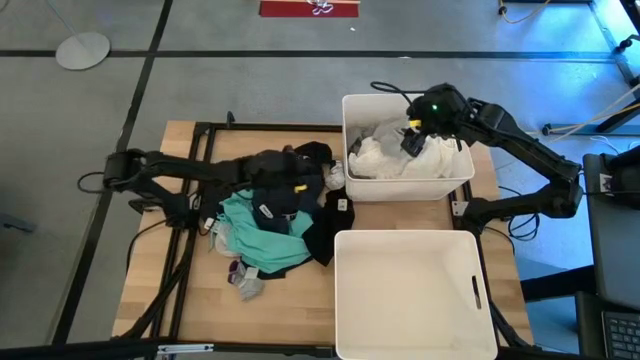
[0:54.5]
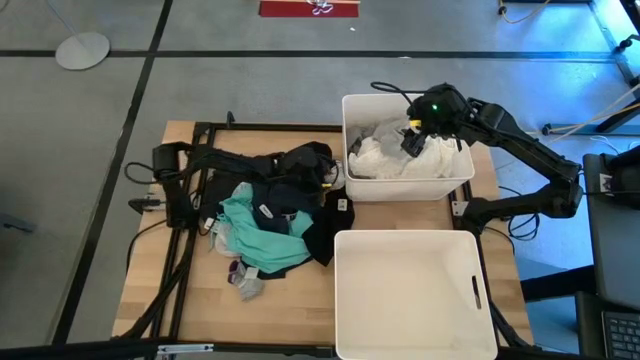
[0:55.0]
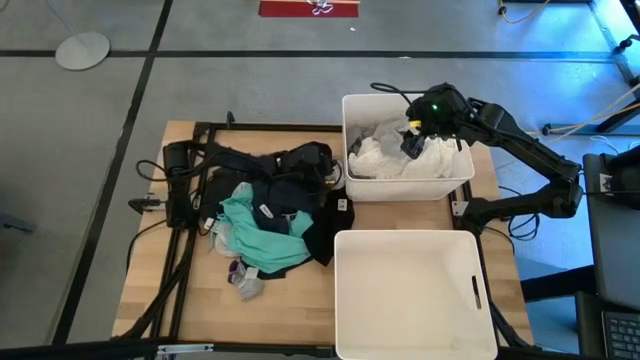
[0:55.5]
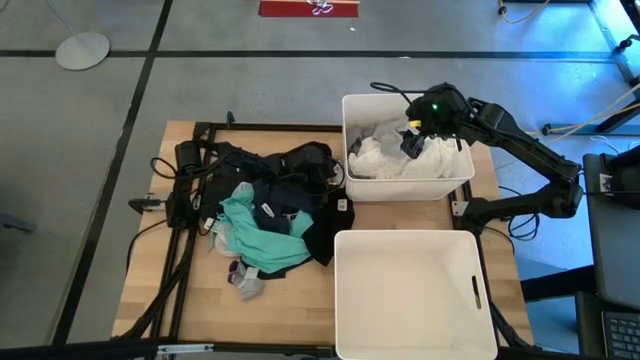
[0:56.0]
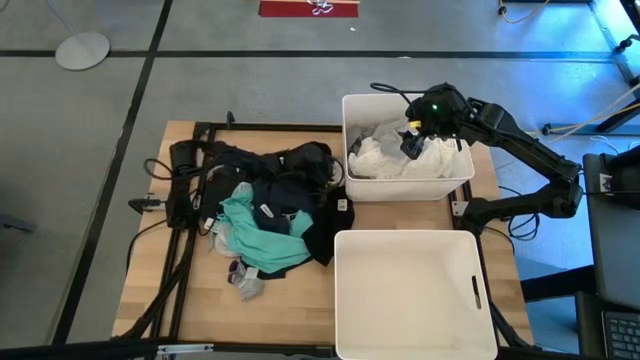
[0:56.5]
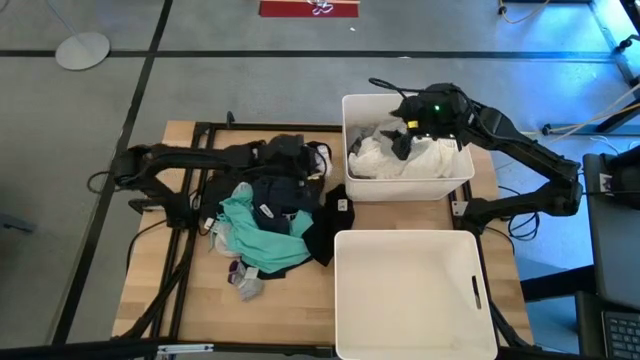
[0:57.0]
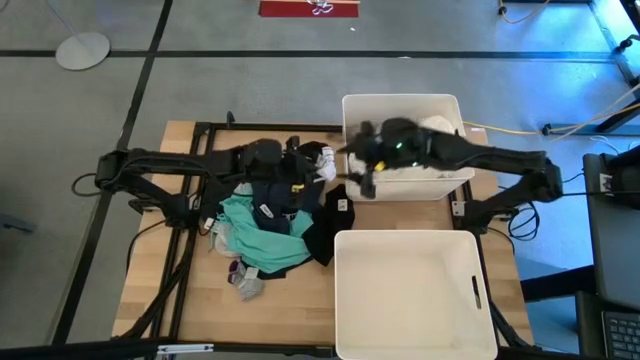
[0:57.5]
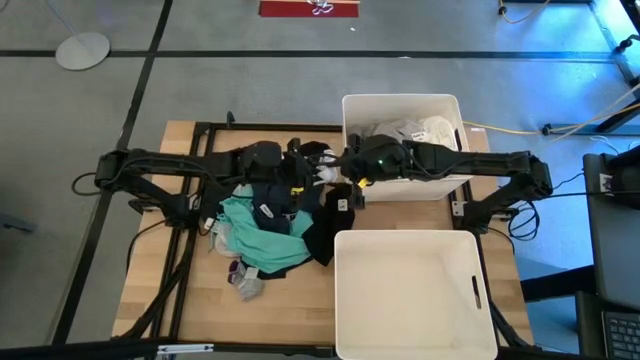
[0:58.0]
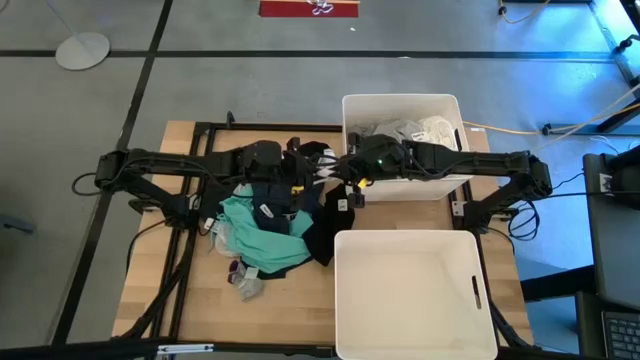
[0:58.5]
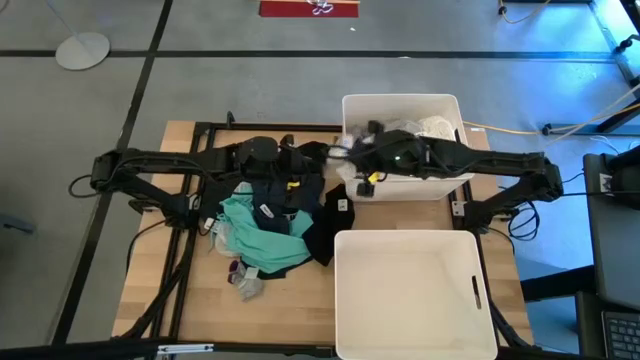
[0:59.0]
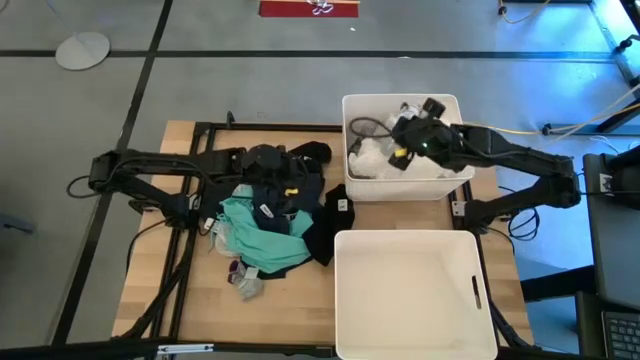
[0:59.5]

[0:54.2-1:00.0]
Task: Sort clothes
Put the white patterned sock into the top white laundry bin

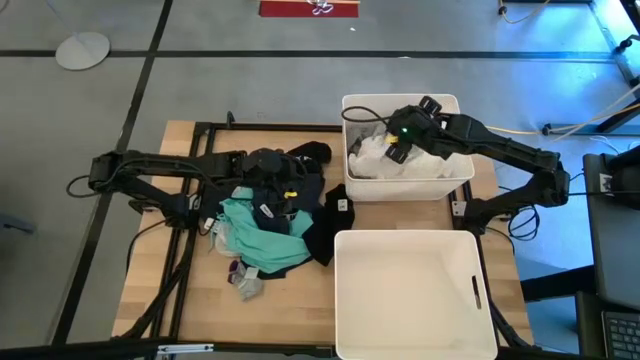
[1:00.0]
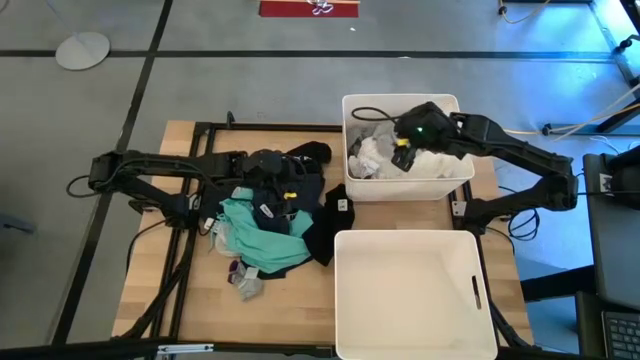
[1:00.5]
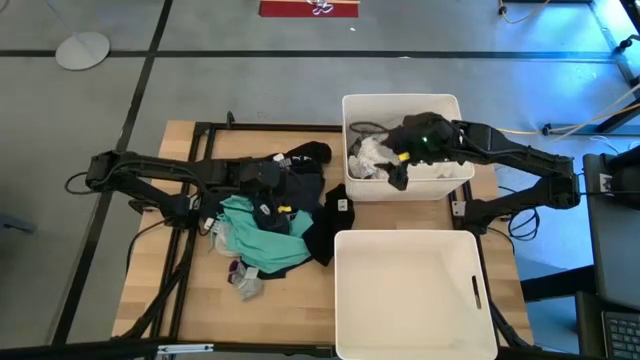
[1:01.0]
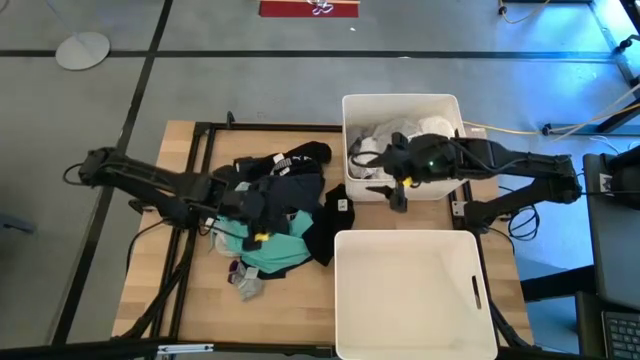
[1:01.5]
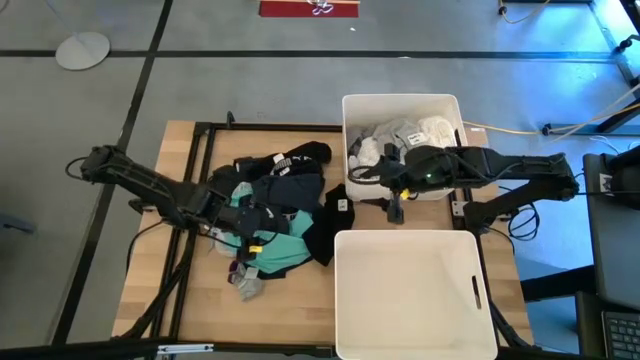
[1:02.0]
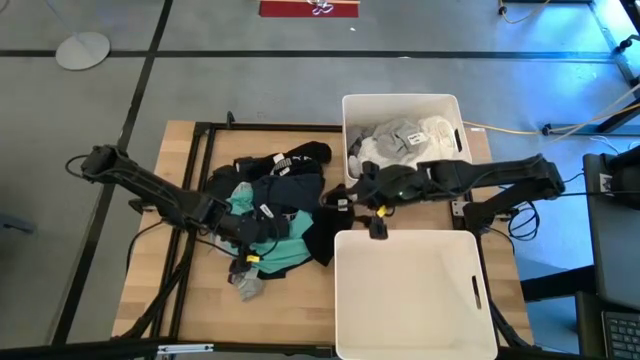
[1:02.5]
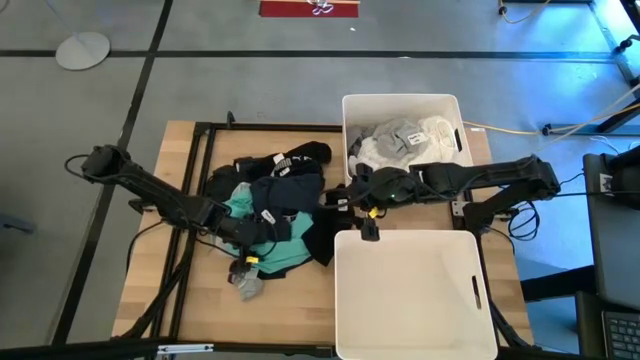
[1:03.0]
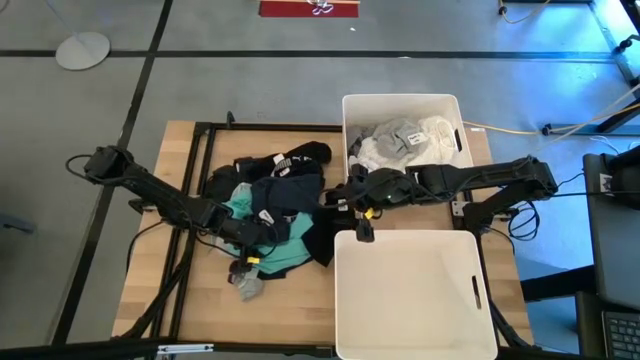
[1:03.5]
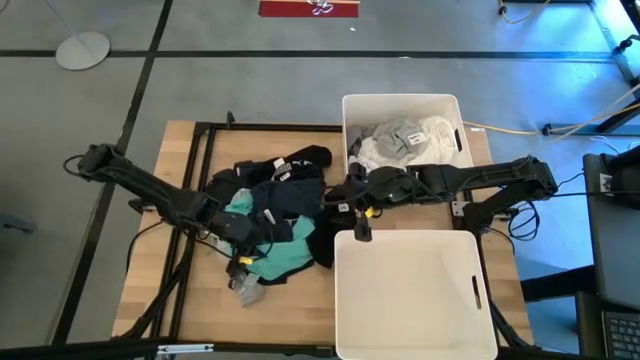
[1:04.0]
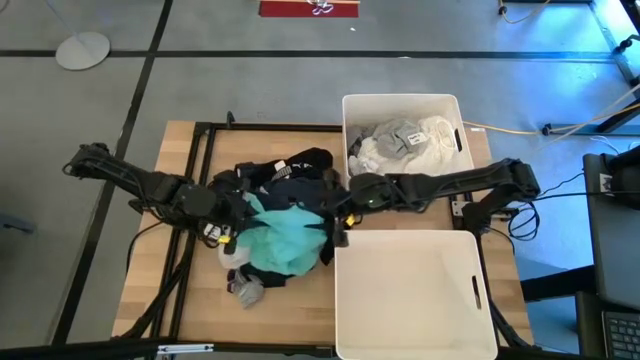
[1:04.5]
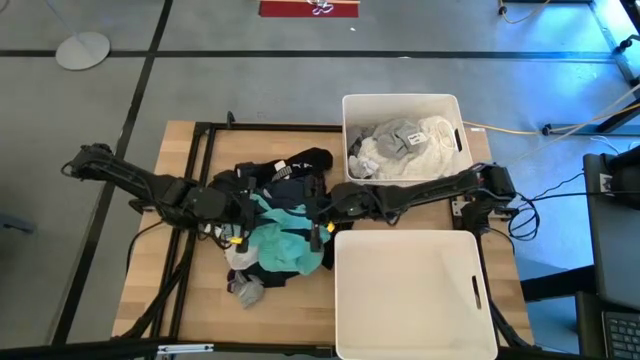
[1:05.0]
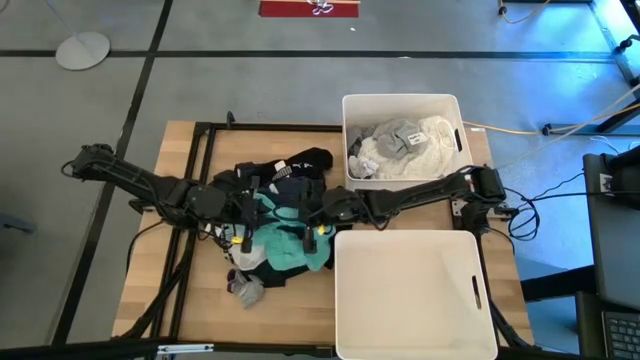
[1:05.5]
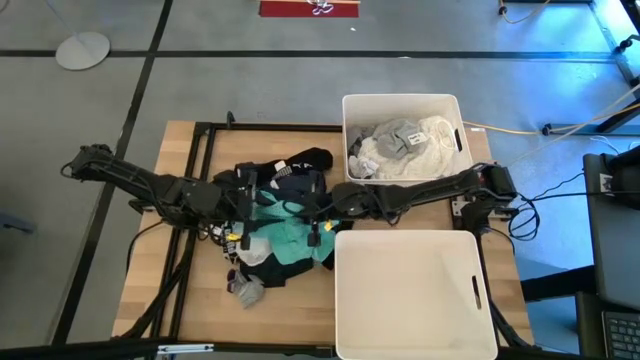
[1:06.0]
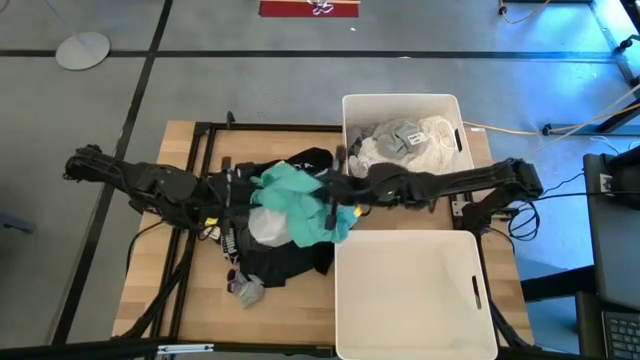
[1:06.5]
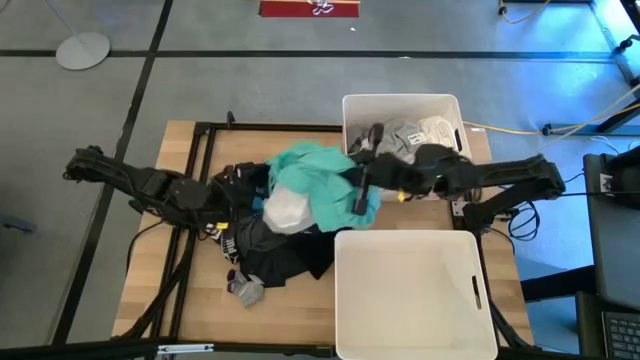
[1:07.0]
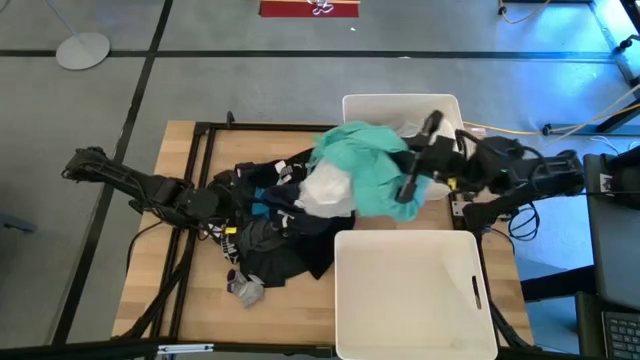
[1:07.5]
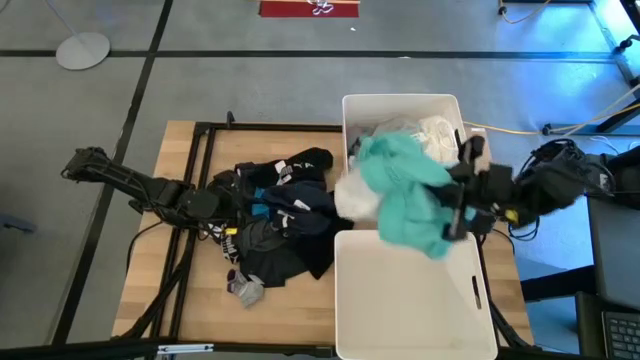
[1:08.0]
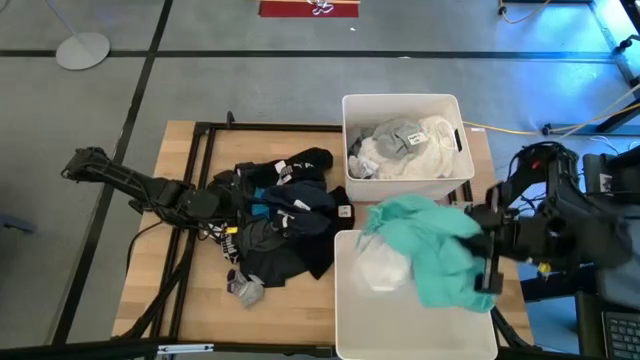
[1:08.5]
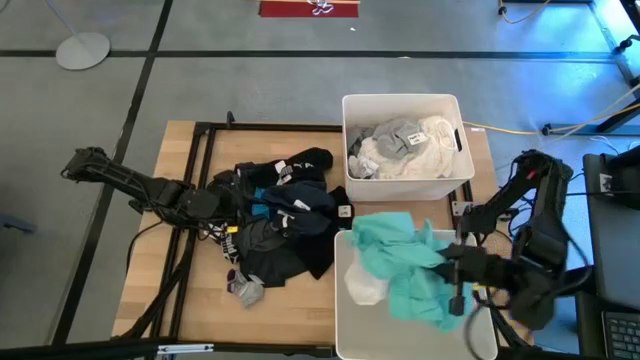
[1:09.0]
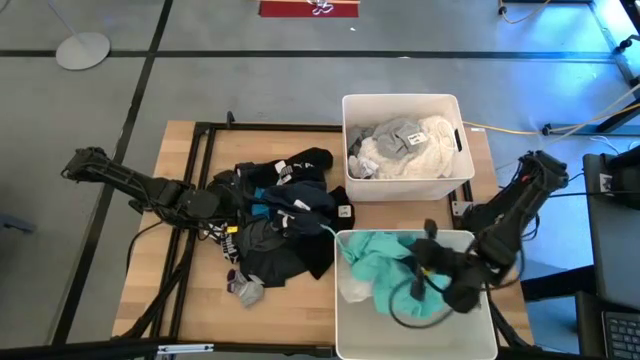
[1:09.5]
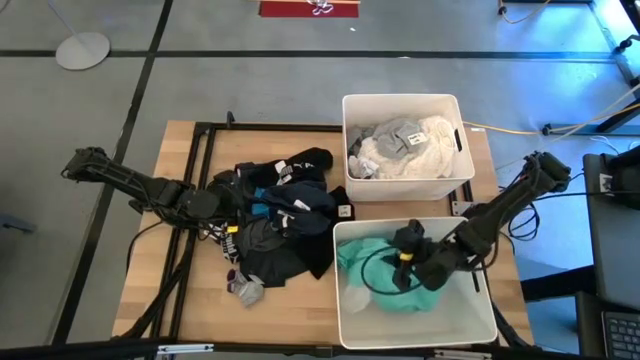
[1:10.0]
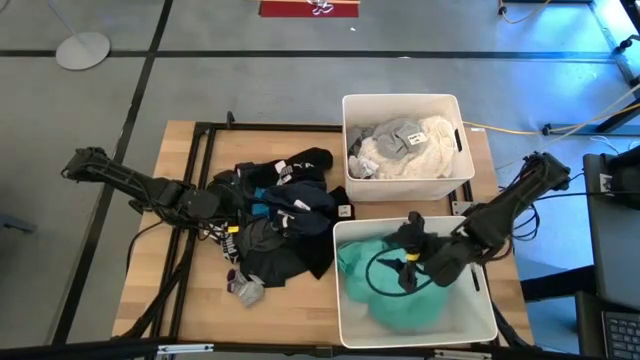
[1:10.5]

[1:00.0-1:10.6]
Put the mint blue pants into the bottom white laundry bin

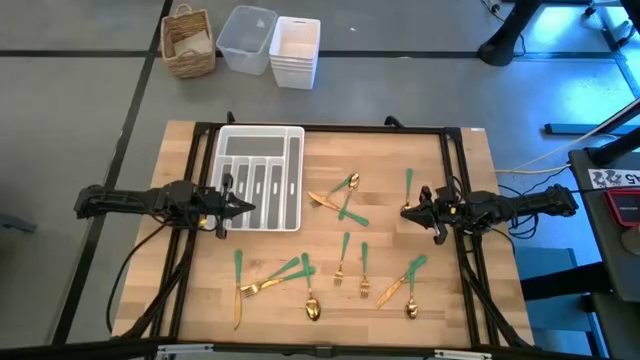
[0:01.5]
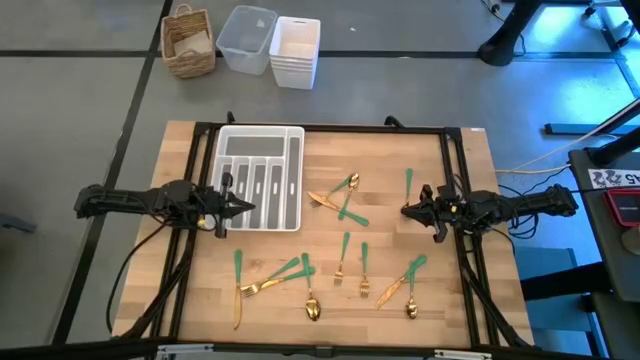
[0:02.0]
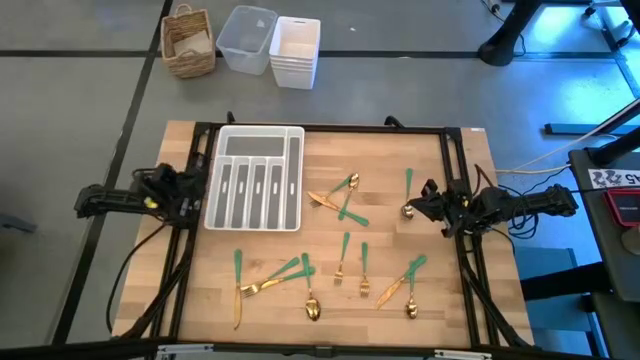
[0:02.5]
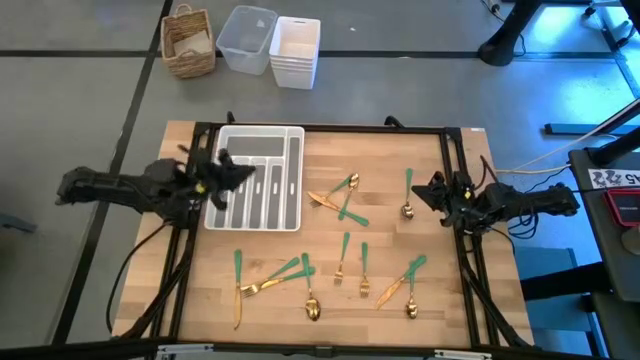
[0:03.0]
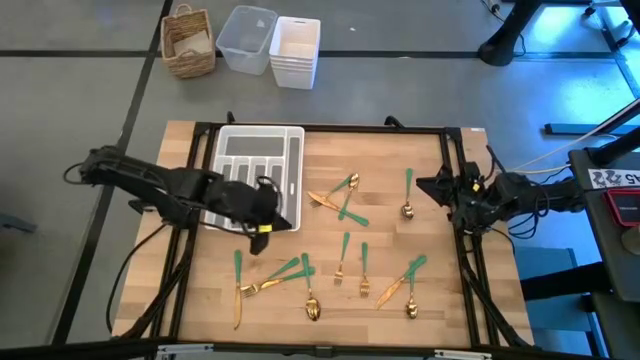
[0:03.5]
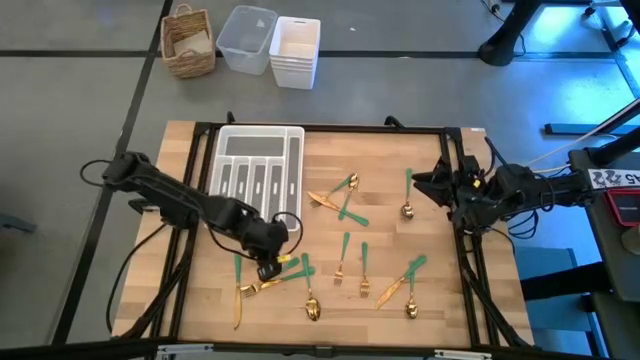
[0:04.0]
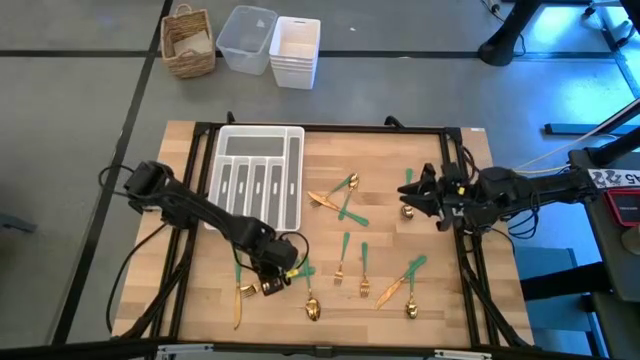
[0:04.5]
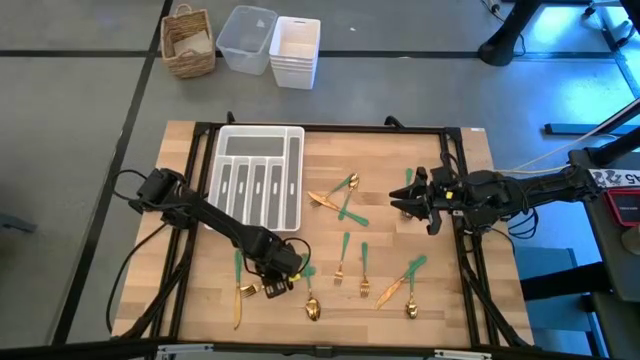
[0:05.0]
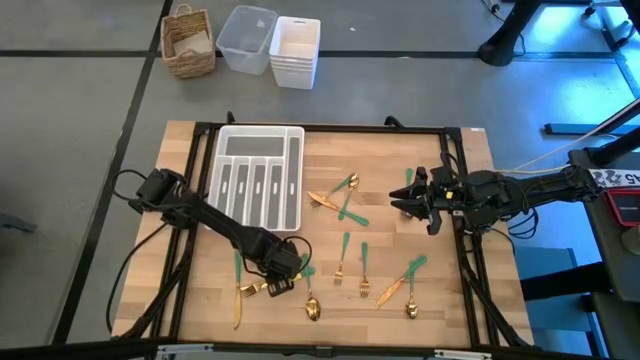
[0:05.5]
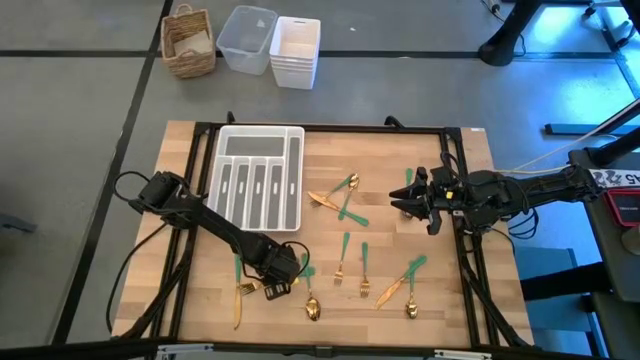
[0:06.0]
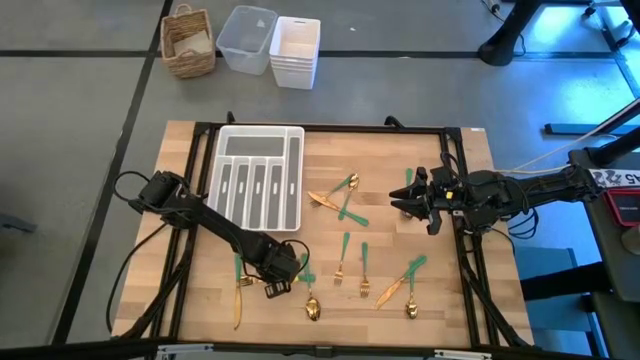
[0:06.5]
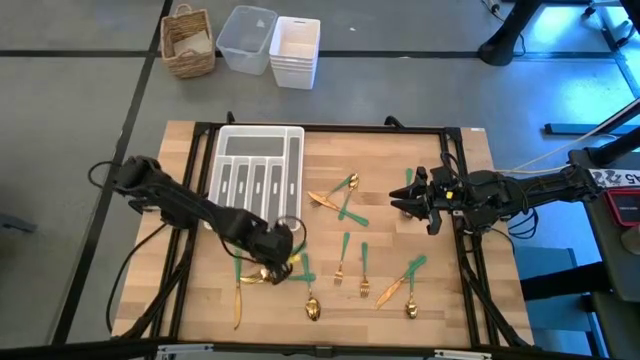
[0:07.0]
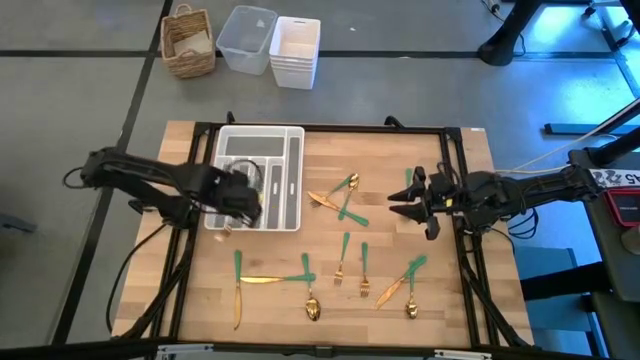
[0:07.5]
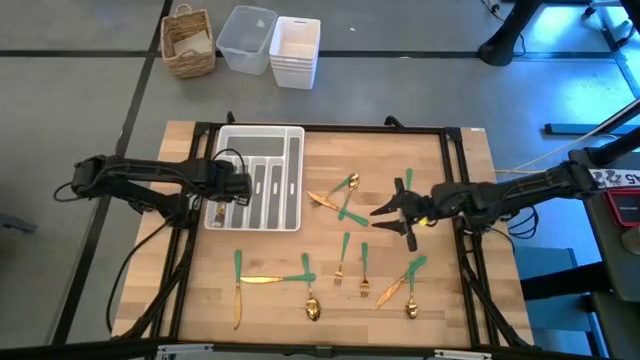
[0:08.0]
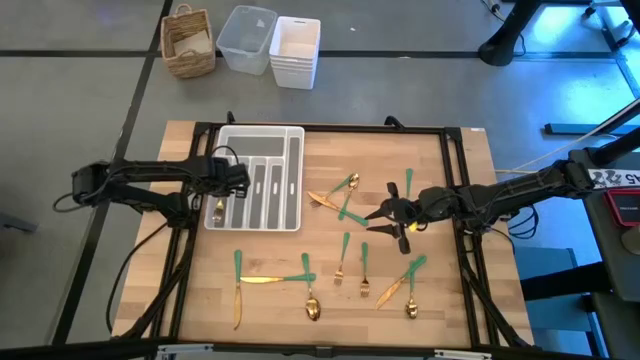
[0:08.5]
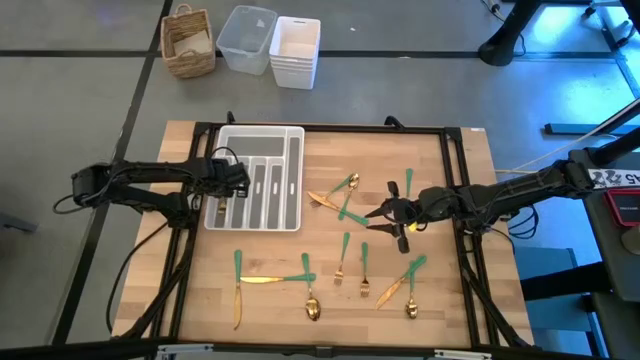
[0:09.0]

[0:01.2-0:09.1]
Task: Sort silverware
Put the green fork into the white silverware tray
